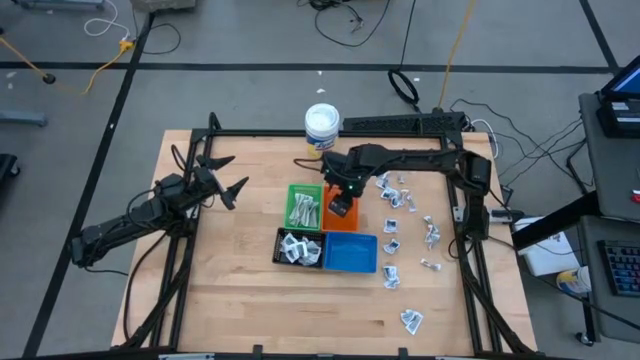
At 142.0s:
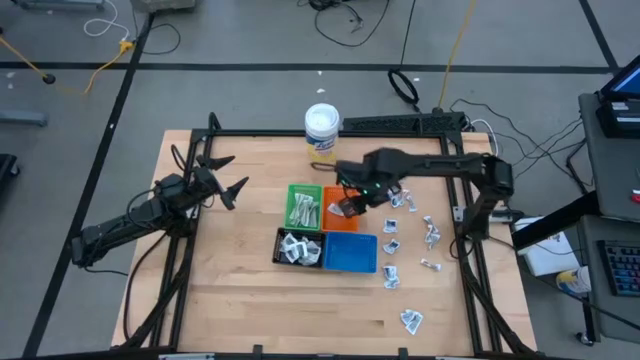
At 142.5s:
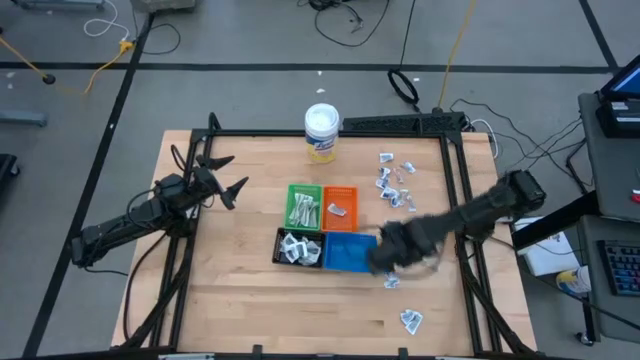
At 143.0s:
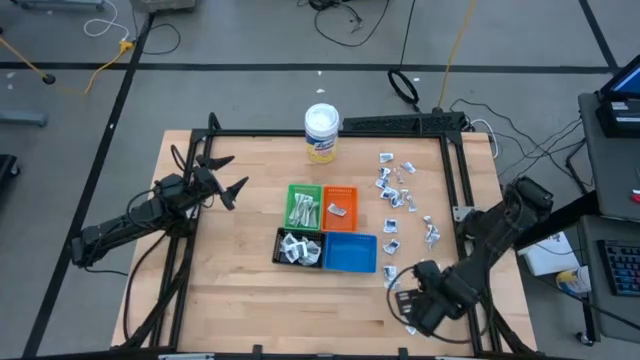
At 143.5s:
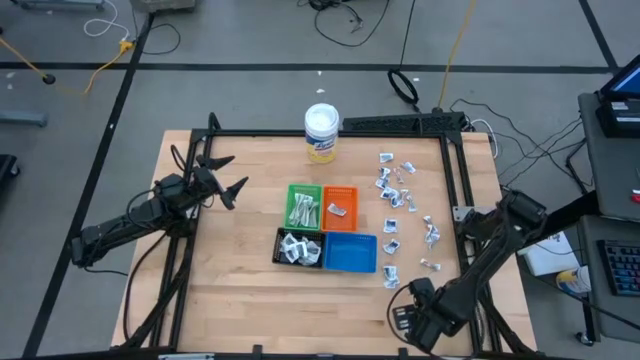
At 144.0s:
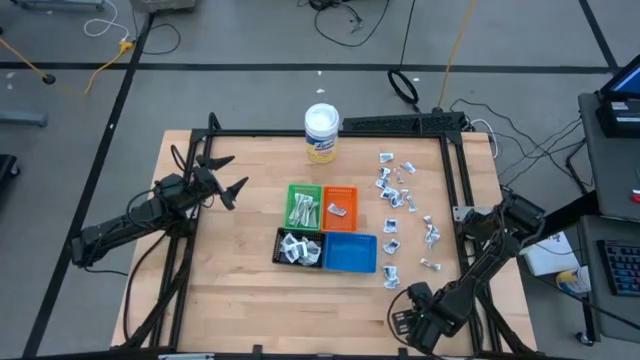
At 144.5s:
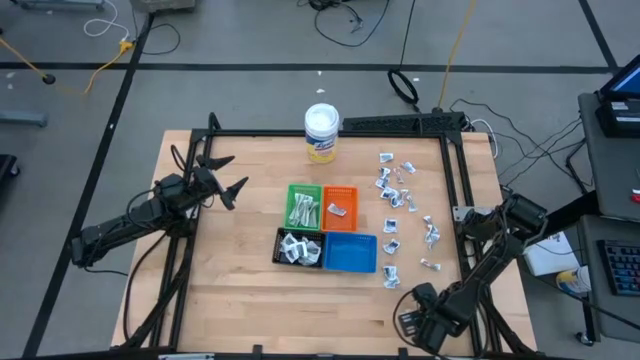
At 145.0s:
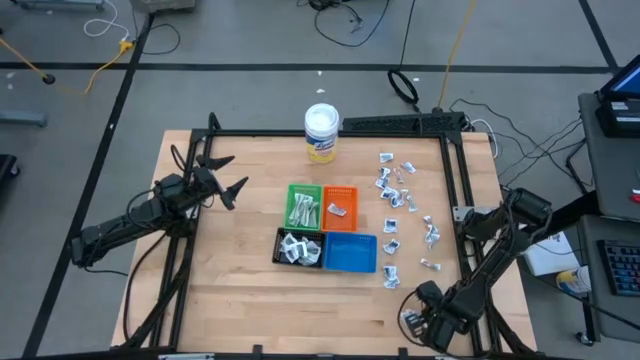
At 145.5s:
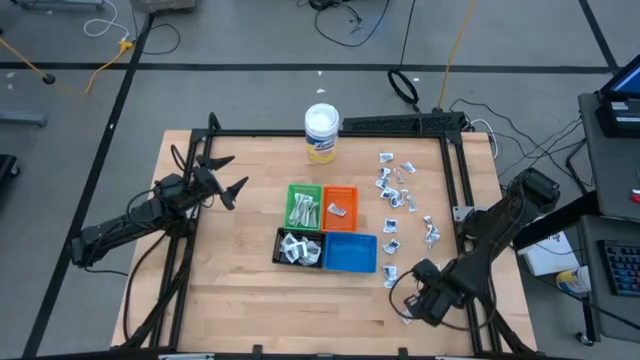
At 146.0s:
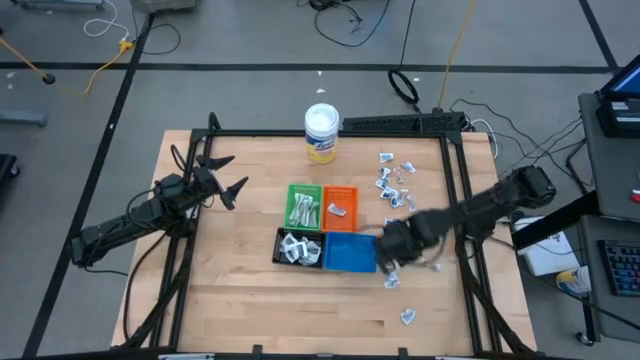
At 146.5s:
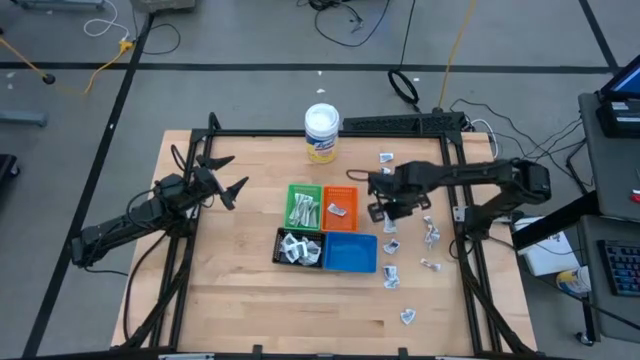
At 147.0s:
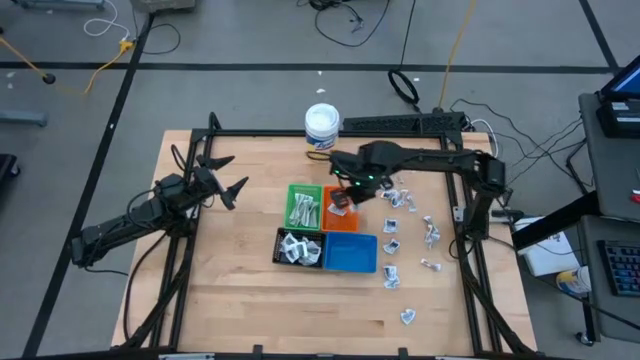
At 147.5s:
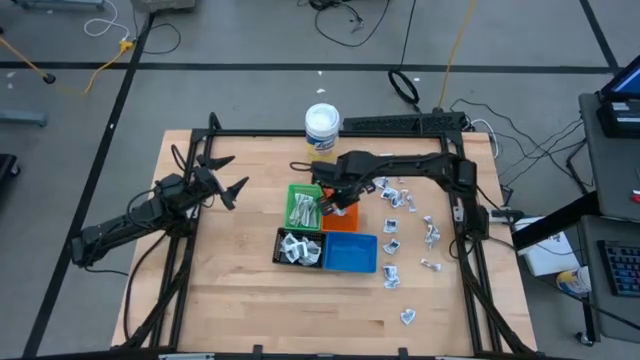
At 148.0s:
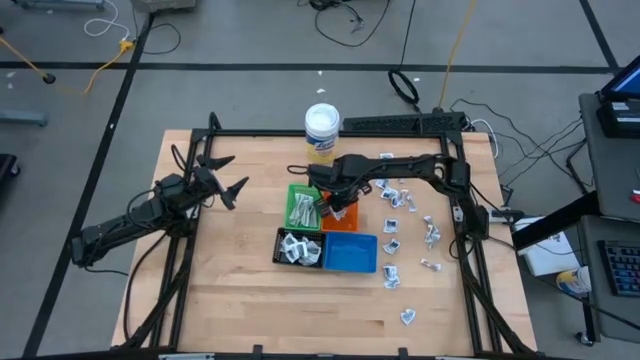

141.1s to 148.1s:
Task: Pick & Place First Aid Supplies
Put the ointment pack into the orange bin

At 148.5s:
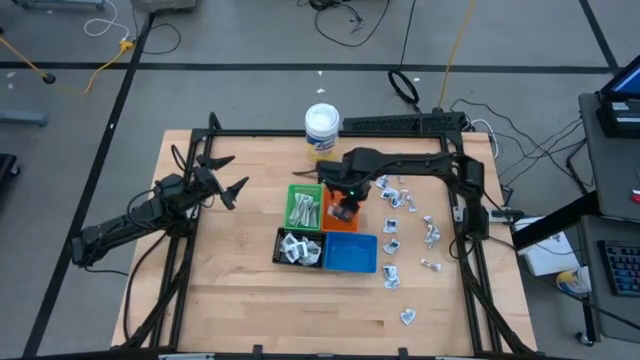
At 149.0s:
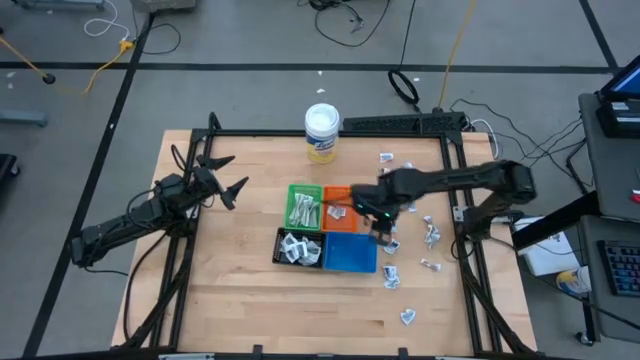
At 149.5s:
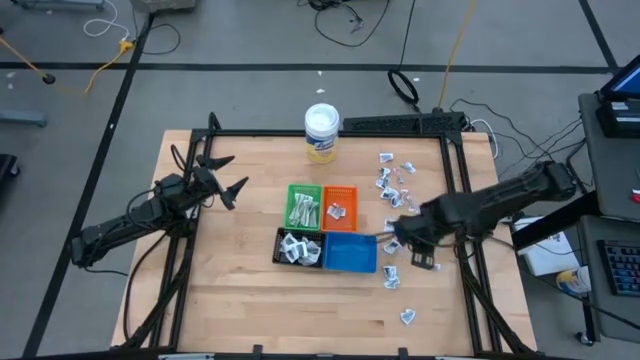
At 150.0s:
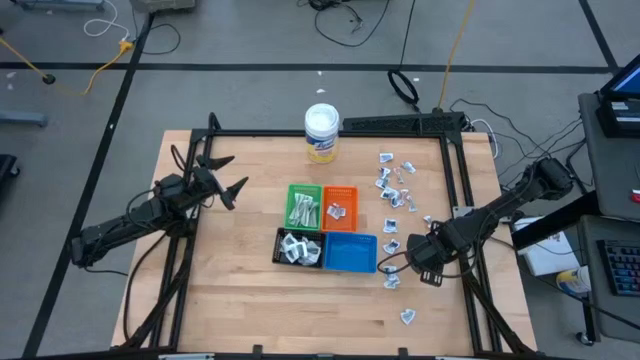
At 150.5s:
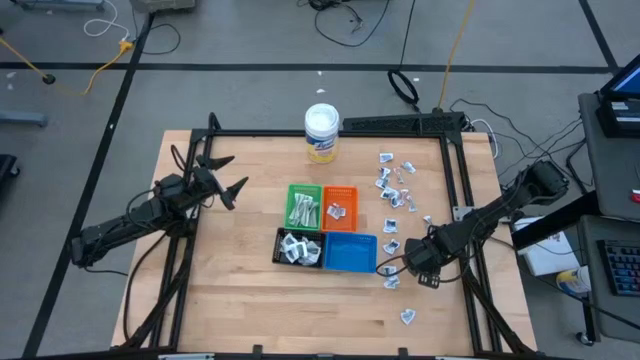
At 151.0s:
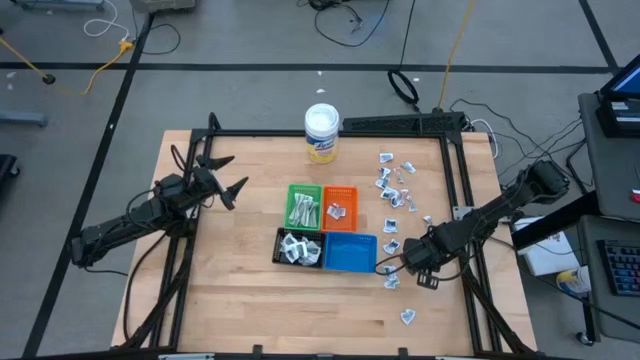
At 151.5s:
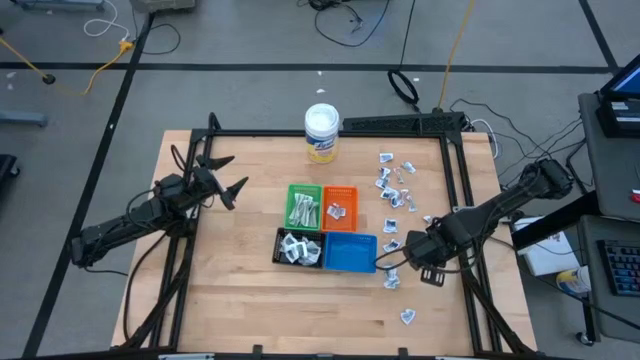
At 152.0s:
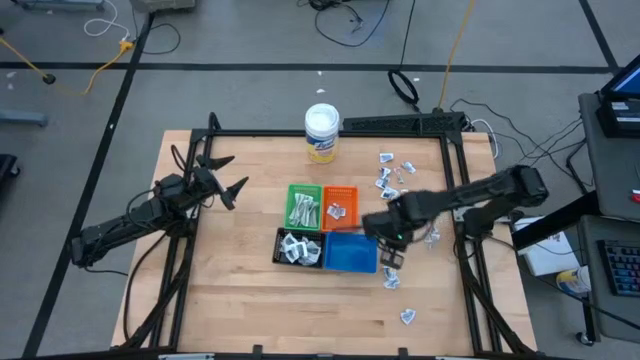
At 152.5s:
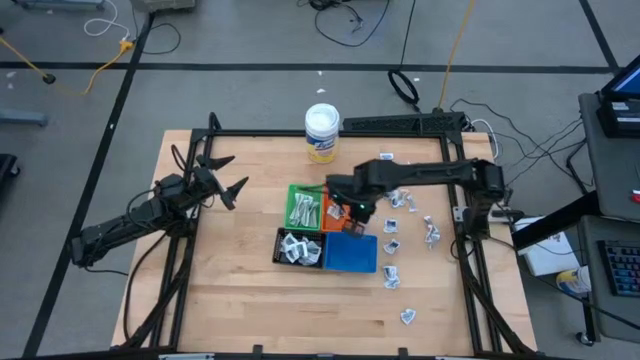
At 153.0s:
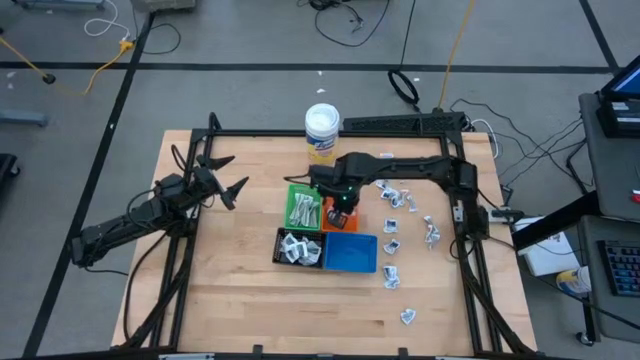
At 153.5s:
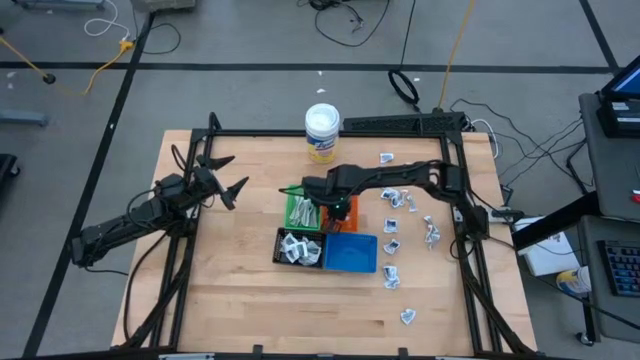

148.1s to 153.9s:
Put the ointment pack into the orange bin

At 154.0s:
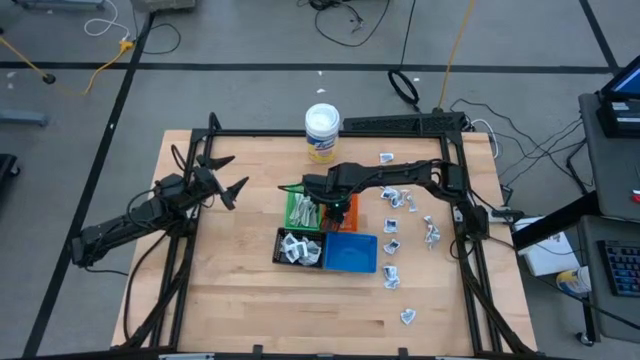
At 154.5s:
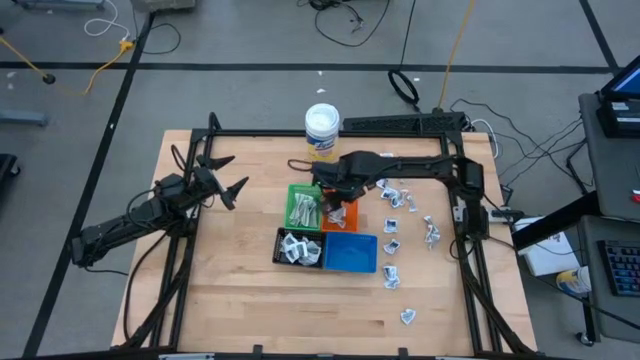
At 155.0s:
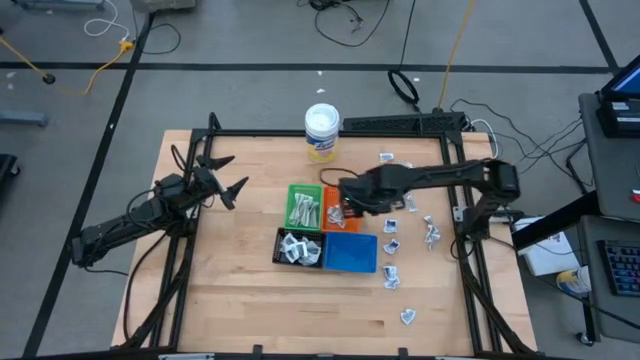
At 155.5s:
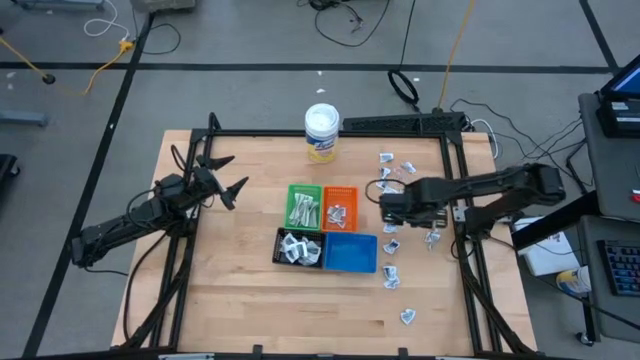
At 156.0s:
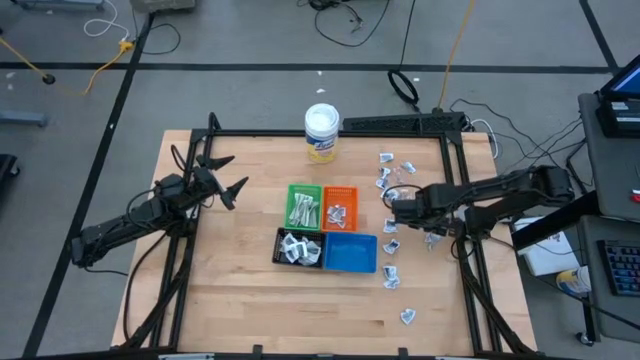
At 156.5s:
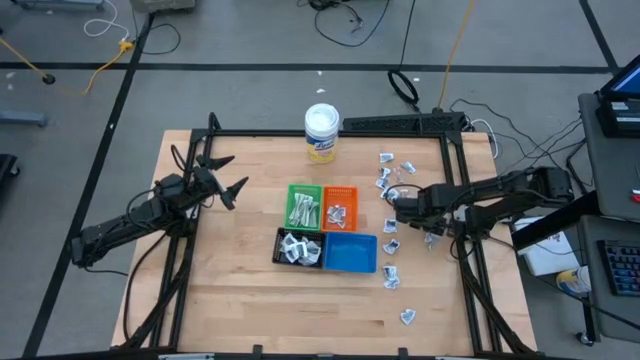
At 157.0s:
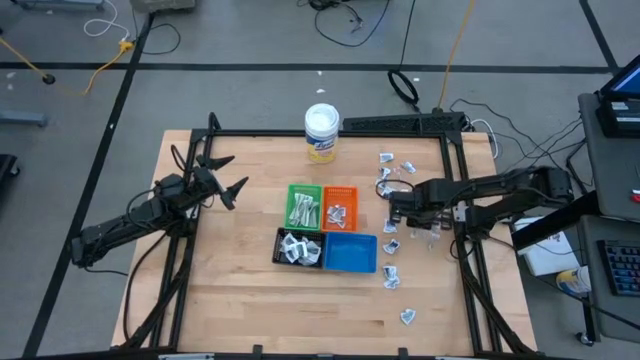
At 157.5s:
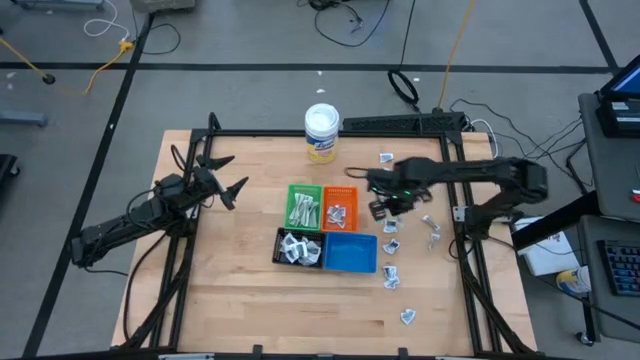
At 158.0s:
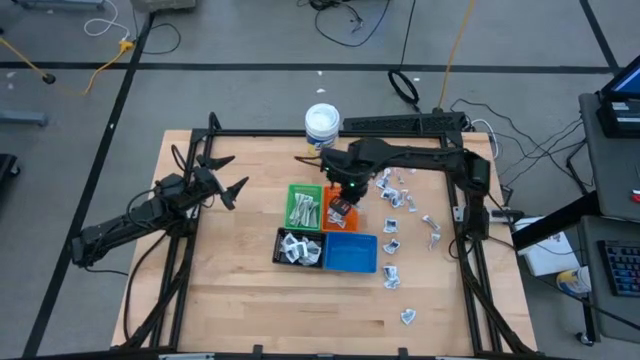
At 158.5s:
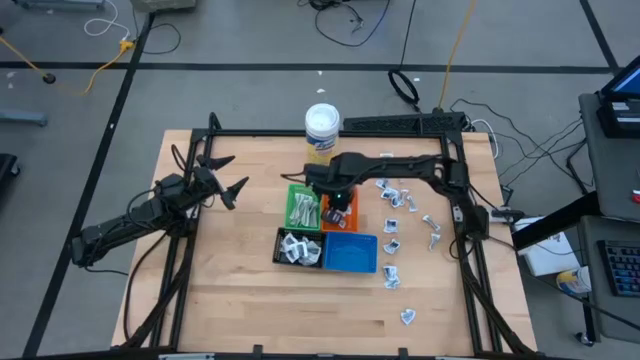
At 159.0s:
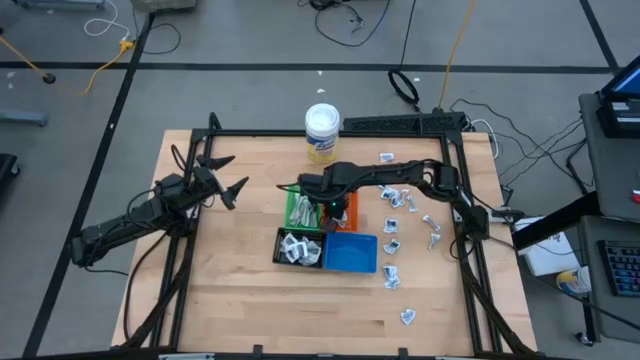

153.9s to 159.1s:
Put the ointment pack into the orange bin

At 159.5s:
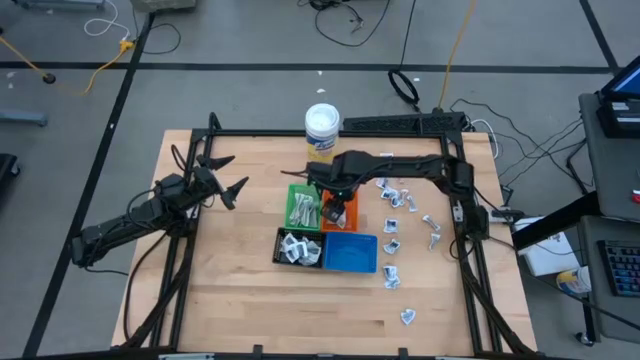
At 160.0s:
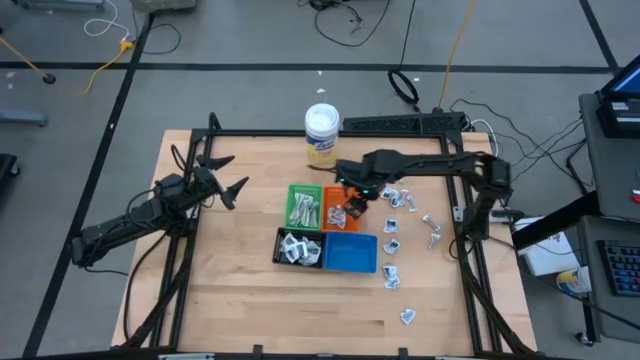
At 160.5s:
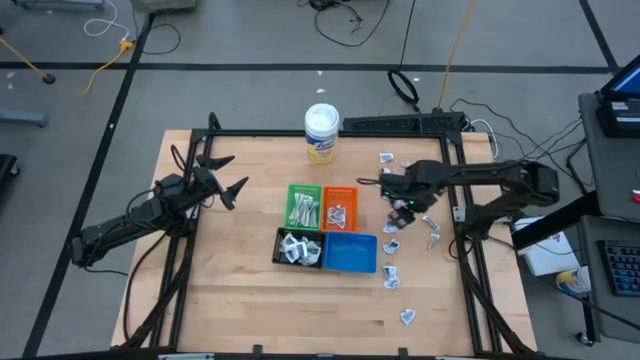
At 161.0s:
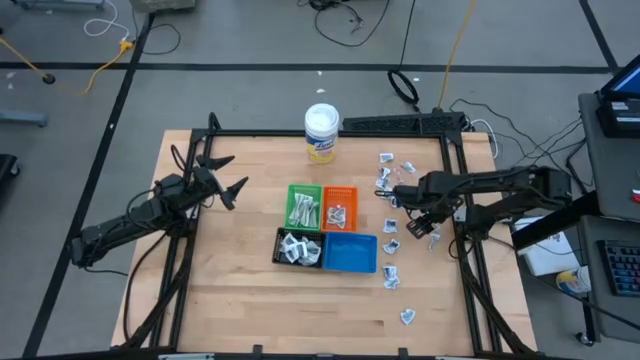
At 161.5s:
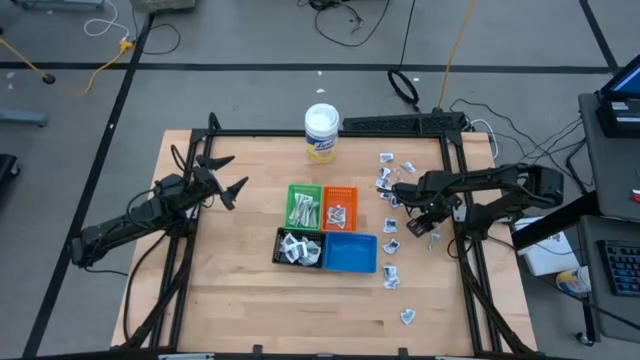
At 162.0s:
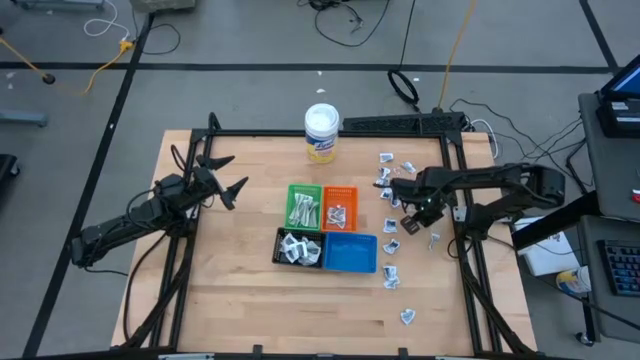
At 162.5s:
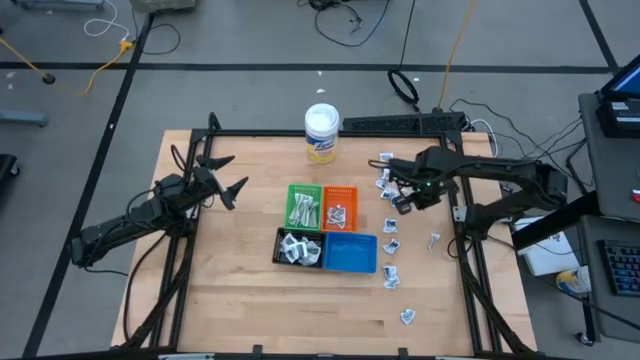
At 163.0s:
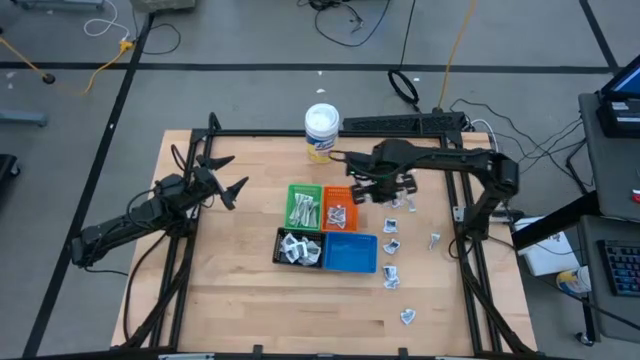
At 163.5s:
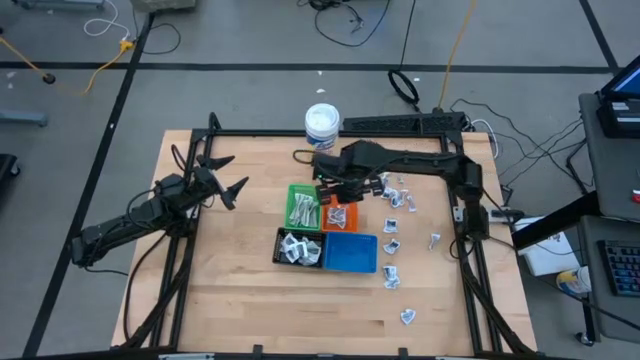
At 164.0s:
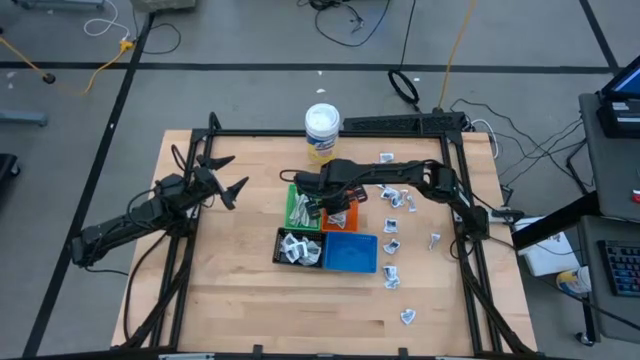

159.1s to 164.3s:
Put the ointment pack into the orange bin
